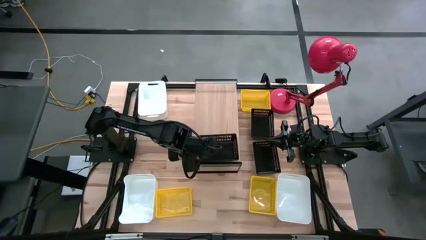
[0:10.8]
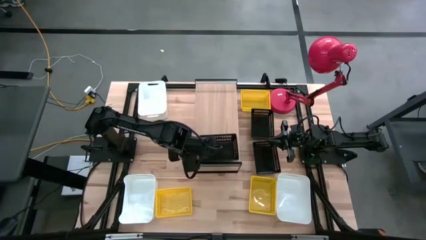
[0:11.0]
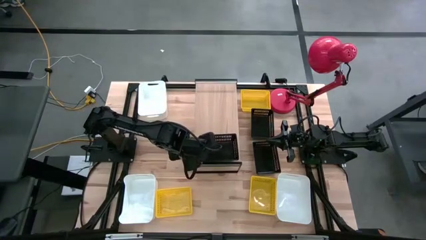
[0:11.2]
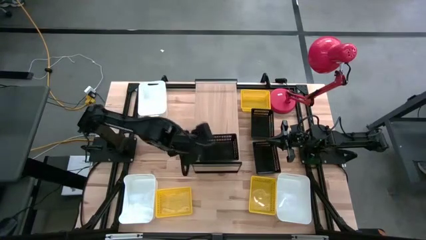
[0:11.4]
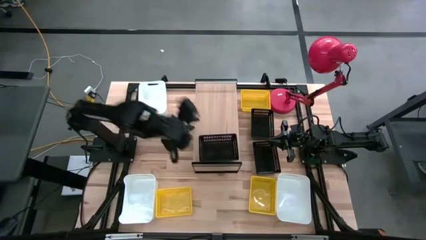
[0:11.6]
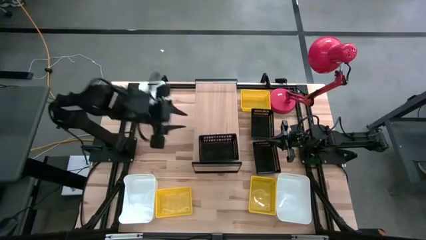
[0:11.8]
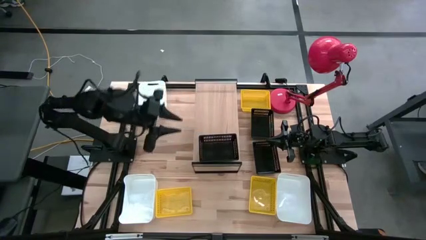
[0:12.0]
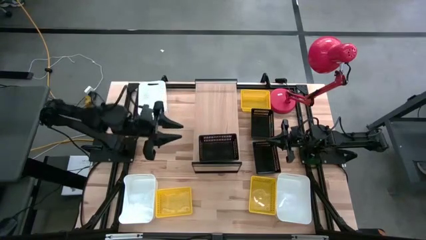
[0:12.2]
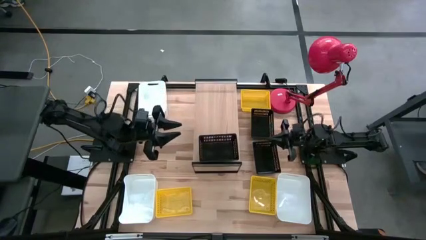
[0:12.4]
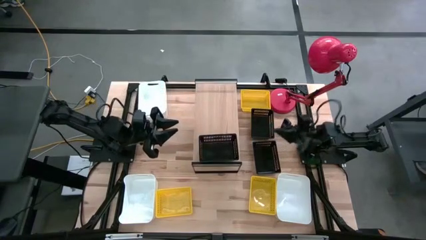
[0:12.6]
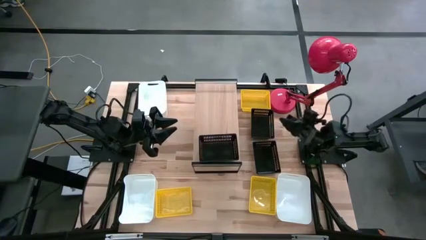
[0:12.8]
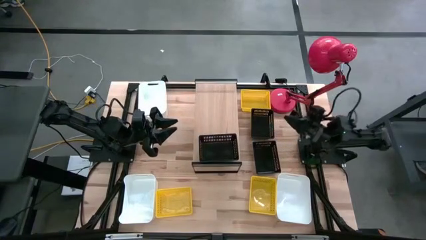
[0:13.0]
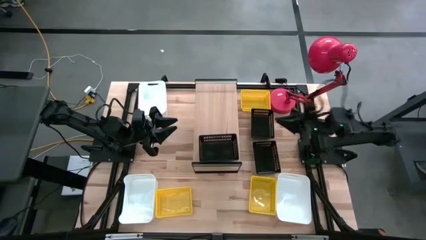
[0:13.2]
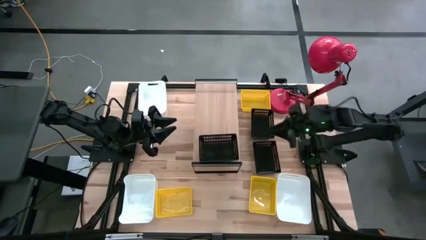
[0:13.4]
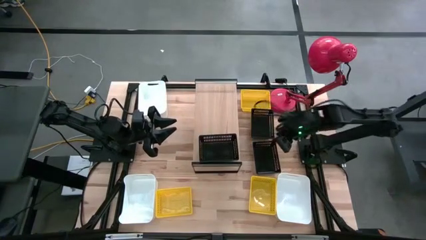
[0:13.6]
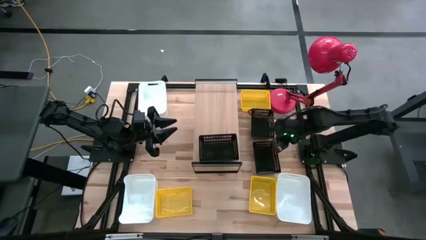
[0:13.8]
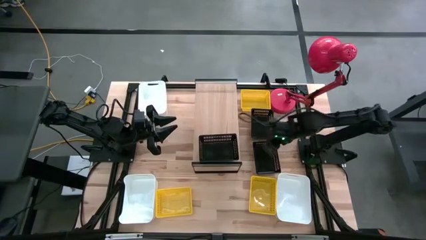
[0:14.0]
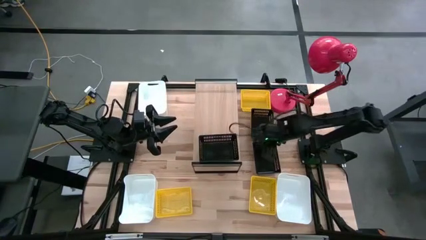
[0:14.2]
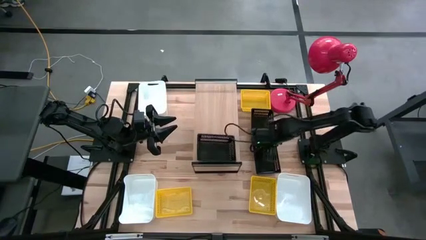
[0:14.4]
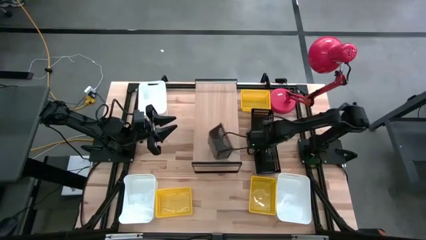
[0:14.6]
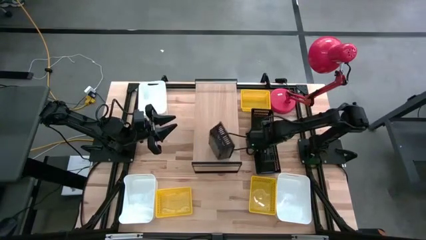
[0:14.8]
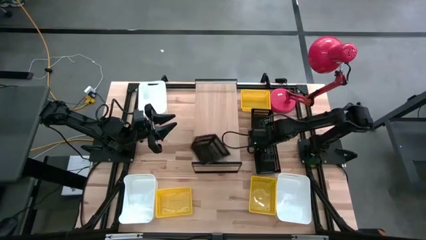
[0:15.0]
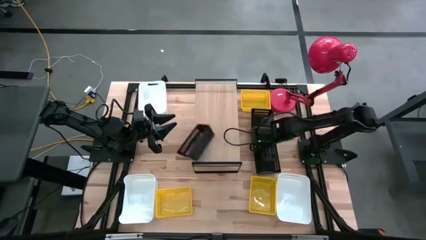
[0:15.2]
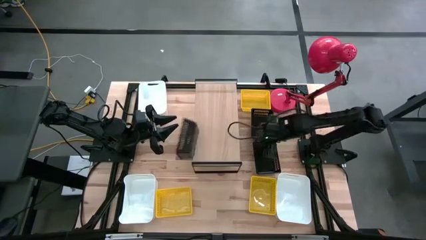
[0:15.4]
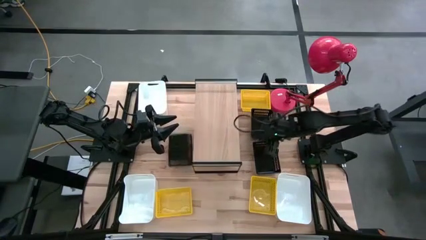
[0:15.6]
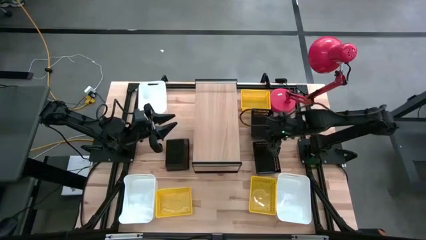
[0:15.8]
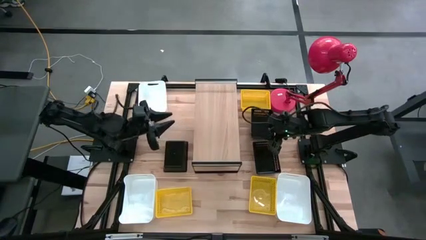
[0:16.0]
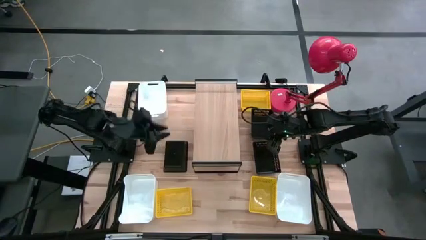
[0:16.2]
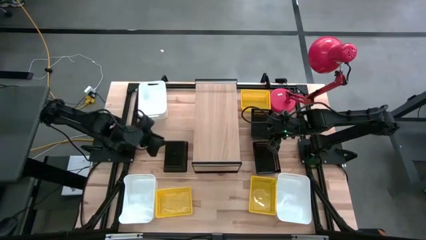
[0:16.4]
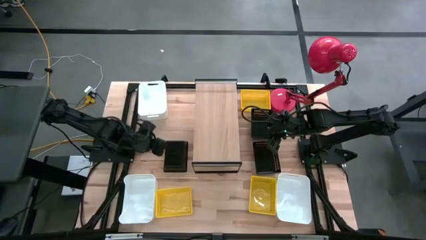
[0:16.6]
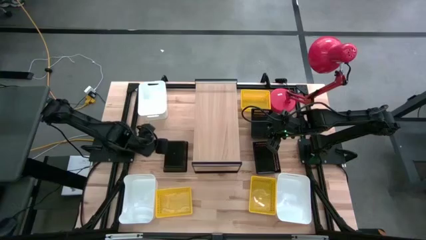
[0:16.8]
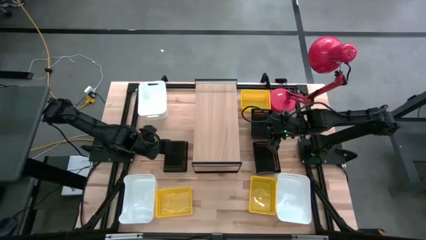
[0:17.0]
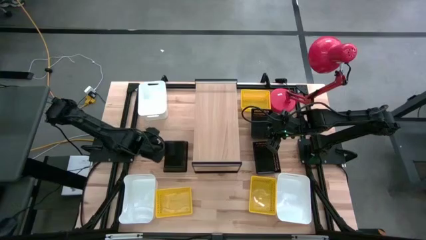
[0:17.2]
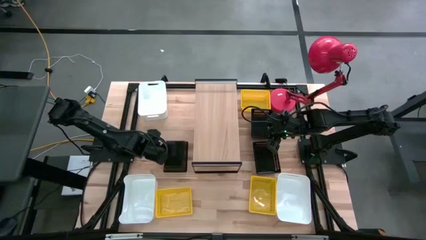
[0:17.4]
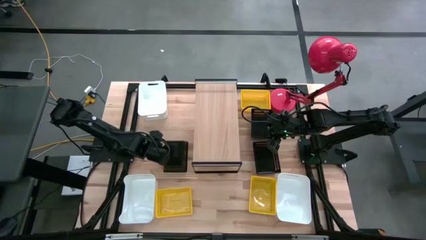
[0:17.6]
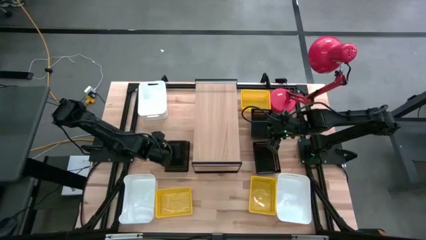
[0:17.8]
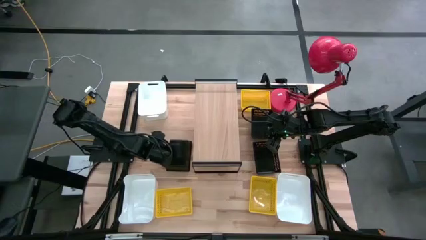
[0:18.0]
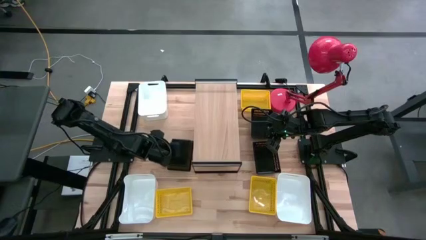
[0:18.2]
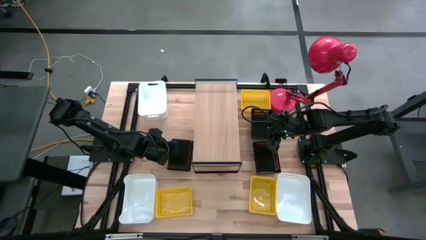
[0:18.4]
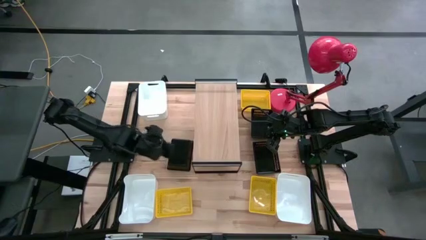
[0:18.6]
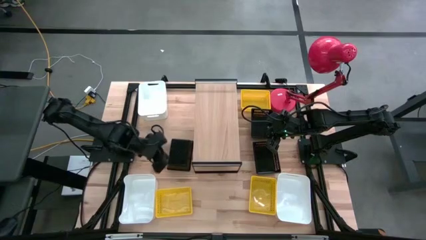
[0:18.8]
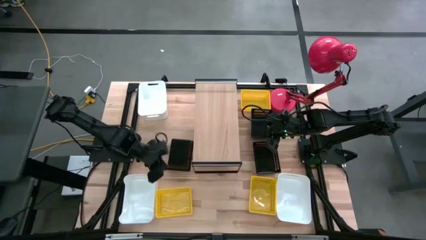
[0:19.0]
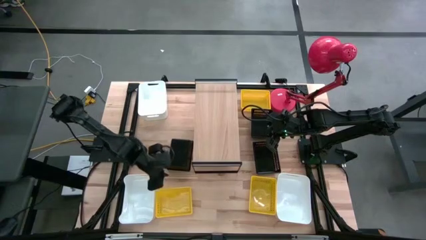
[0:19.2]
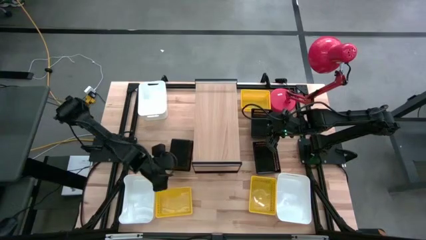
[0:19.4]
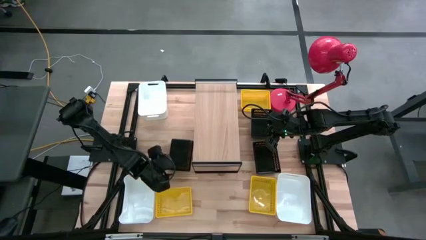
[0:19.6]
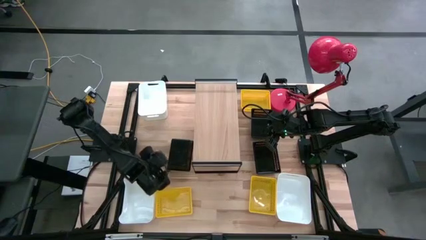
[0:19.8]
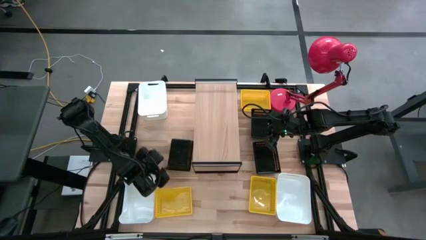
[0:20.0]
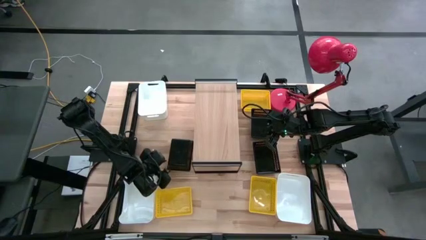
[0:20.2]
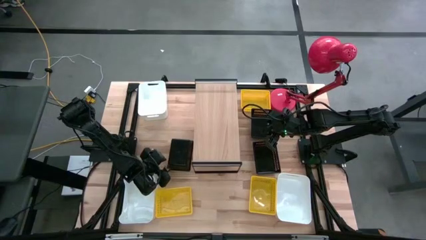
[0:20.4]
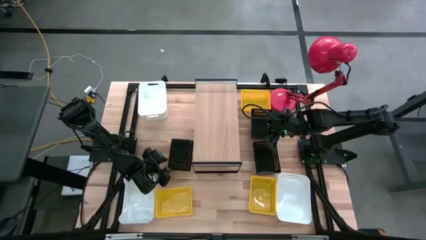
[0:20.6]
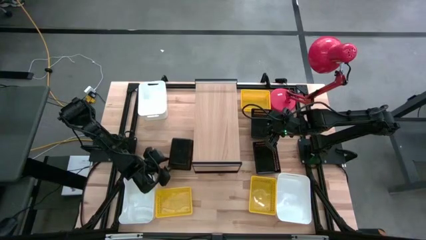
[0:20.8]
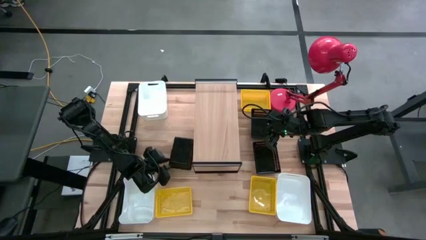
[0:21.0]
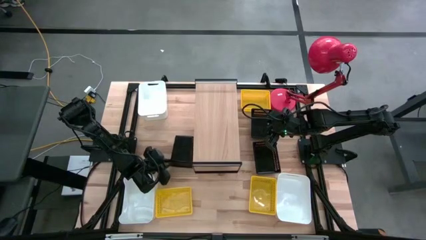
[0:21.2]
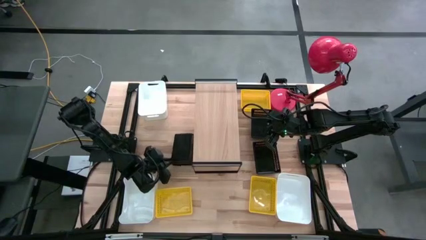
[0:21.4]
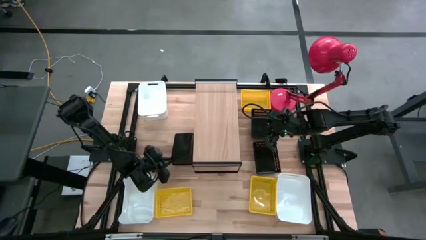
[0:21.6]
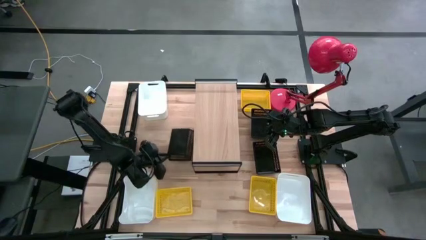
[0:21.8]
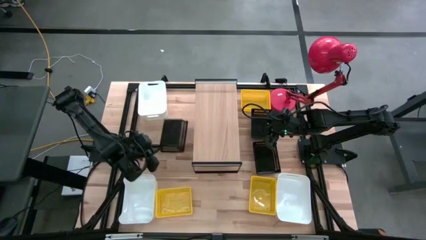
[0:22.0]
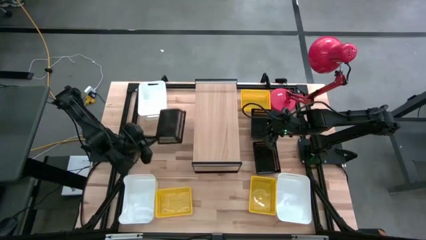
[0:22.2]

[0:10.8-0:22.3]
Task: Stack baskets on shelf by color
Put the top left black bin on the shelf
